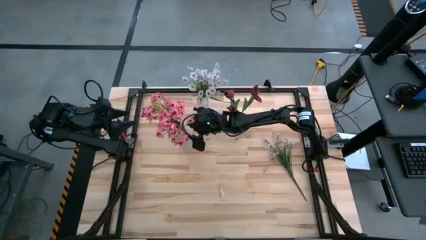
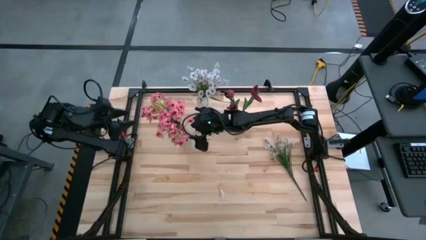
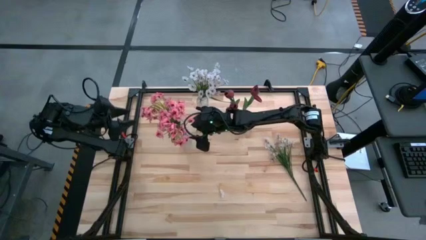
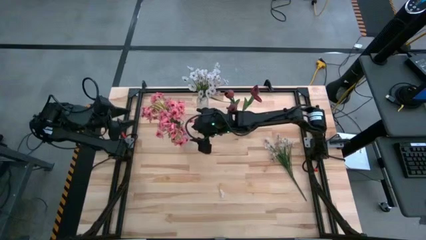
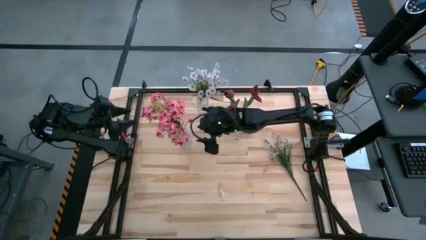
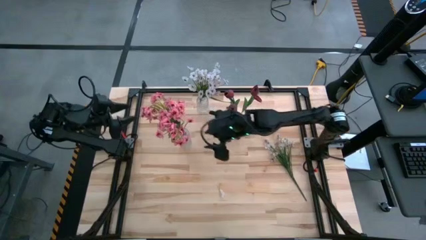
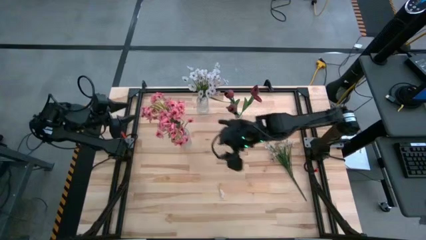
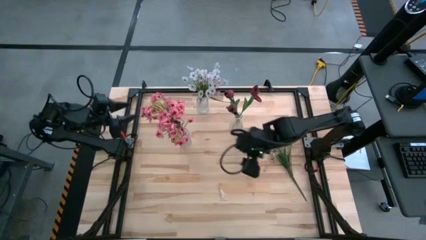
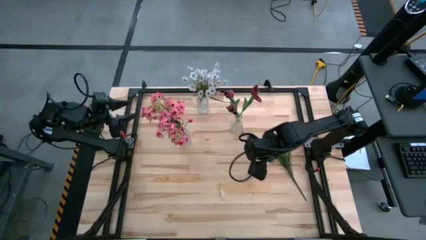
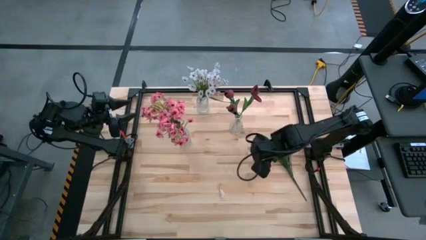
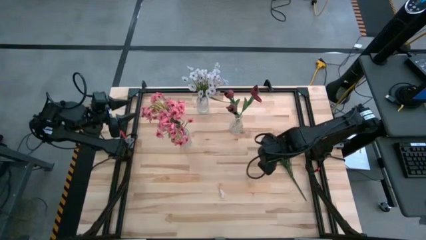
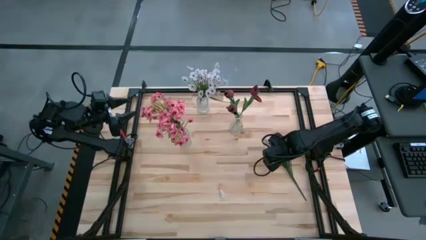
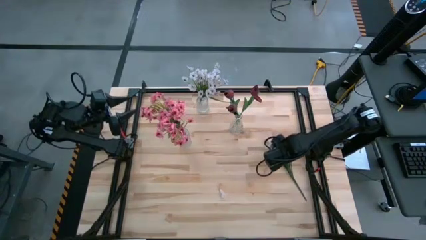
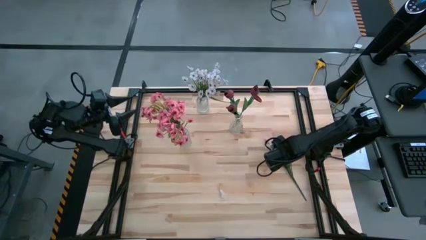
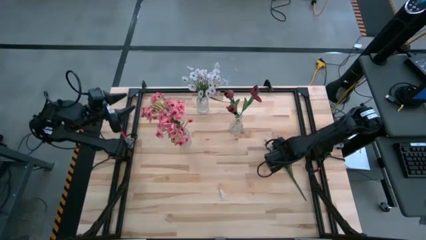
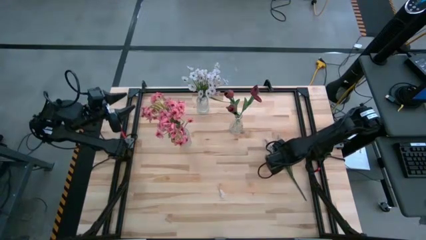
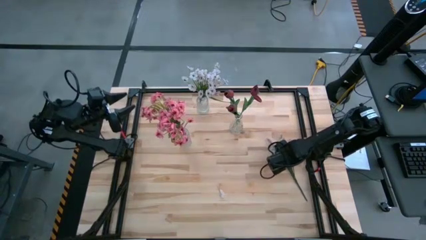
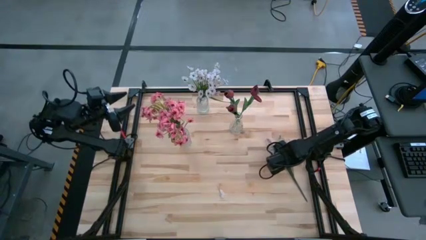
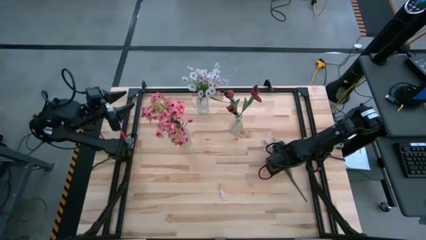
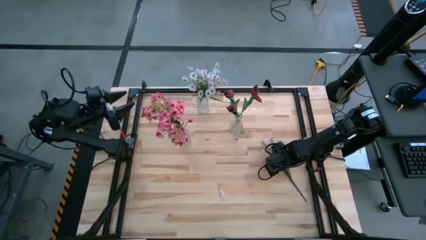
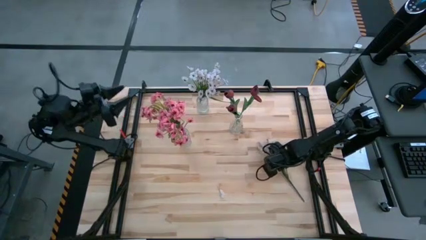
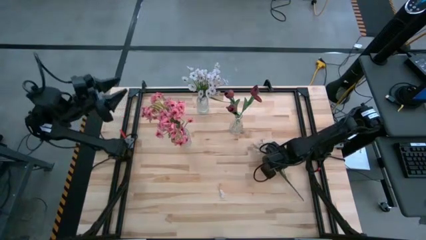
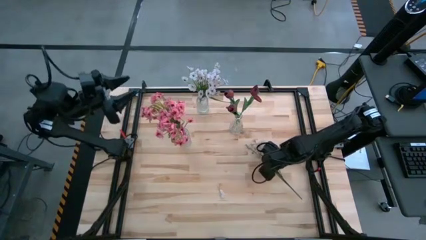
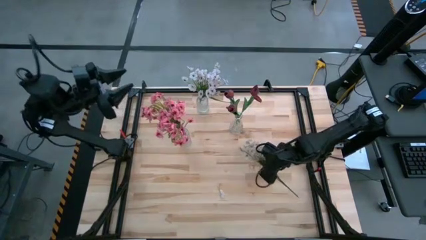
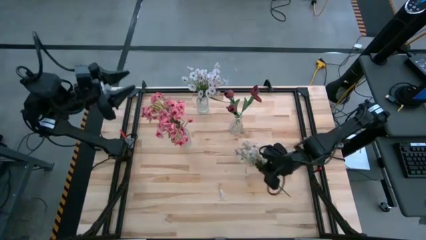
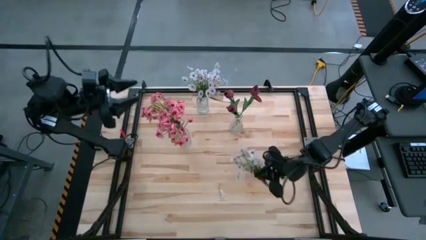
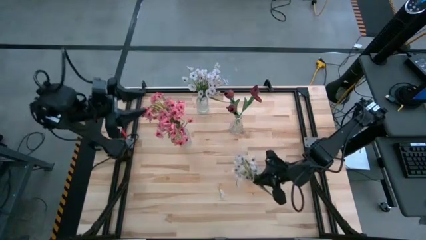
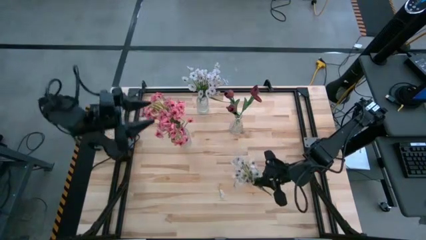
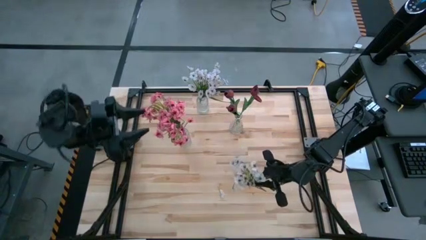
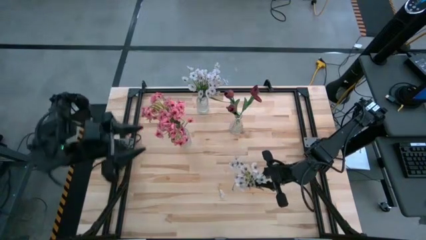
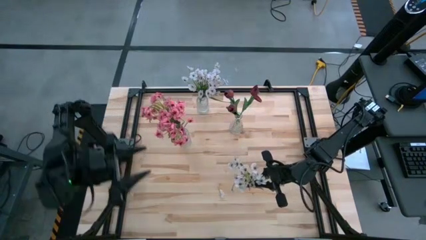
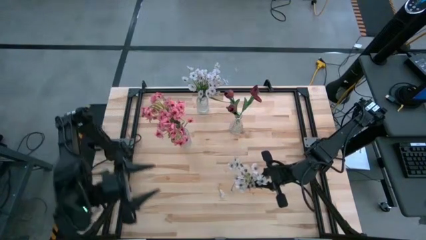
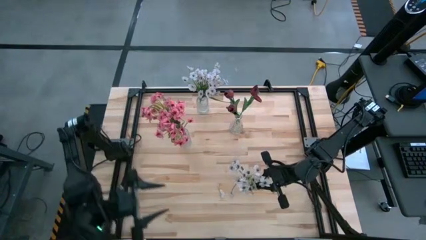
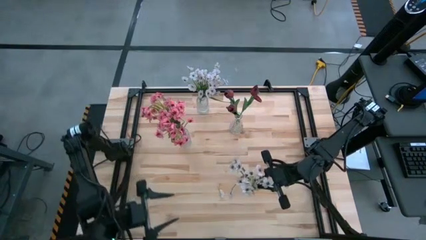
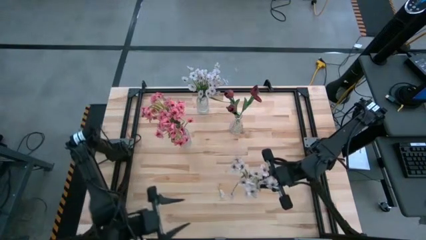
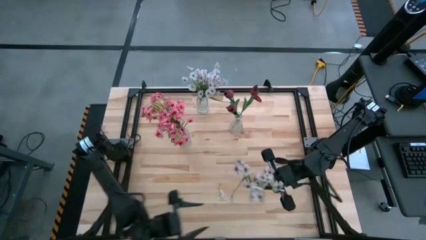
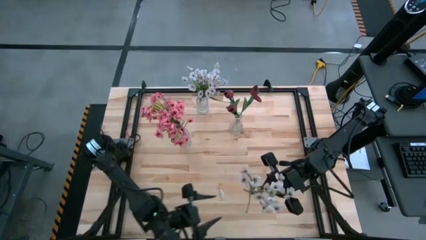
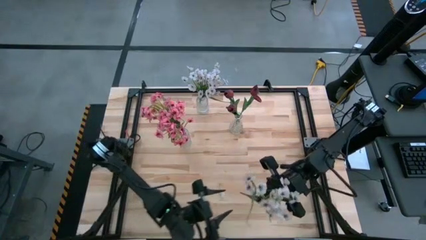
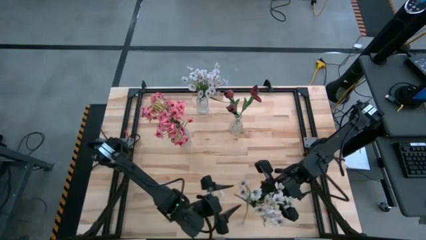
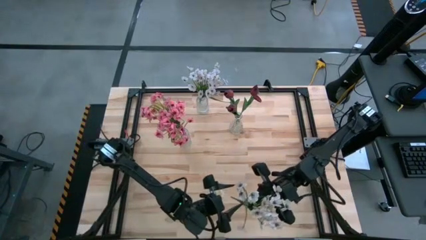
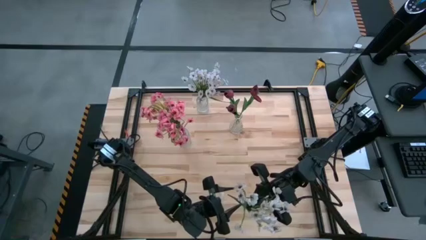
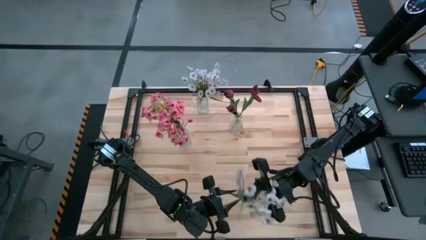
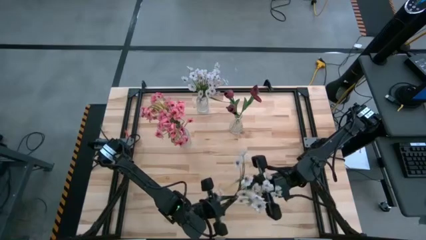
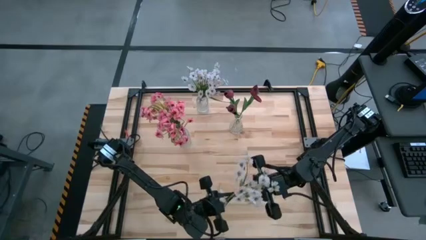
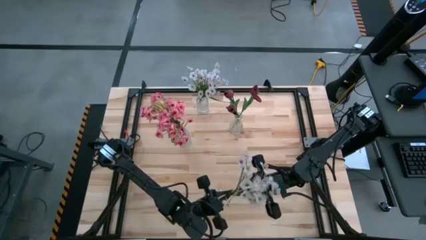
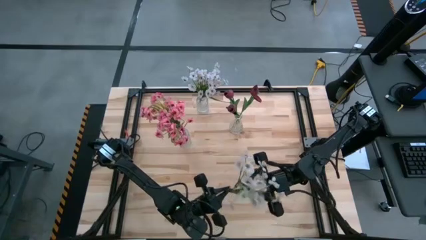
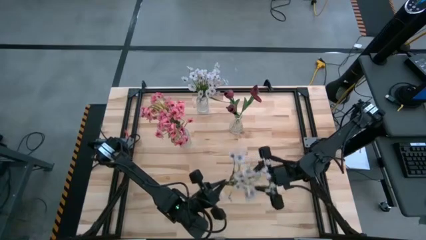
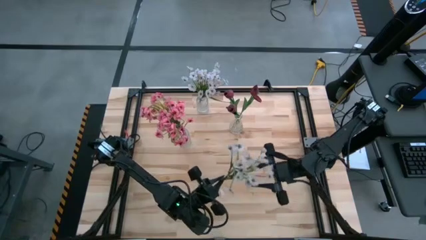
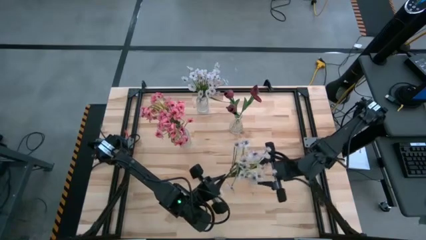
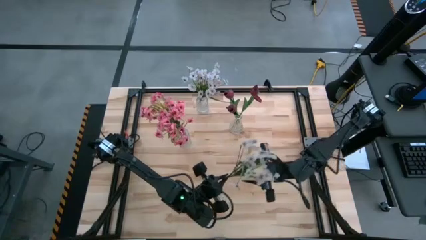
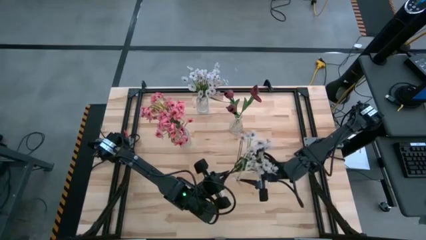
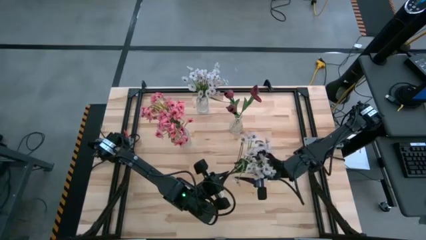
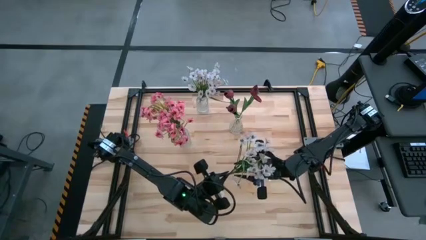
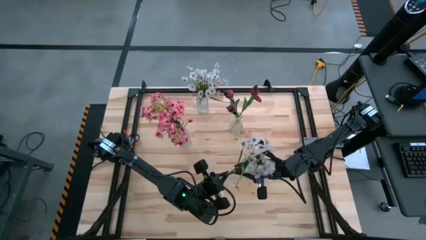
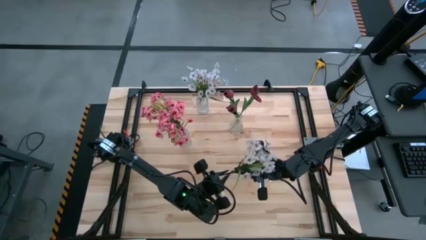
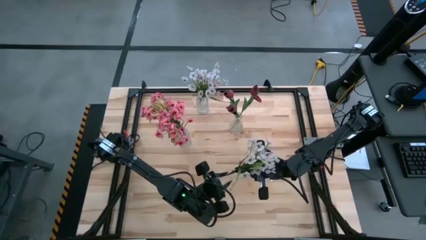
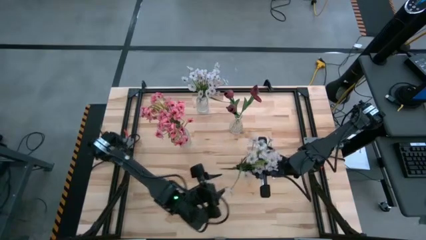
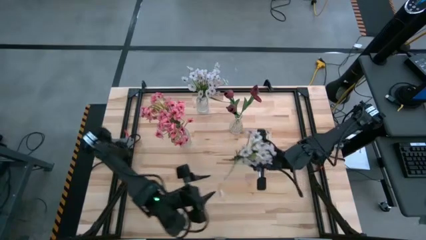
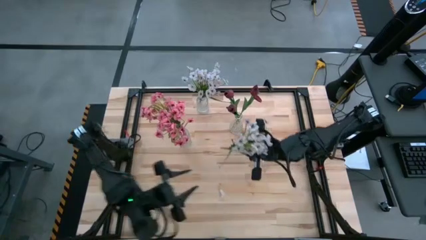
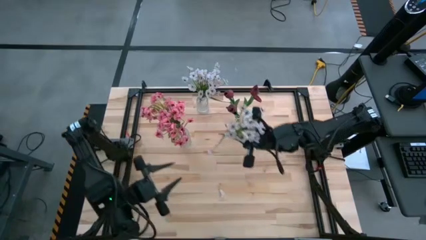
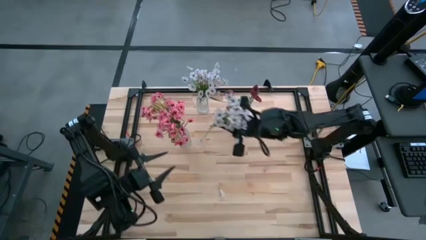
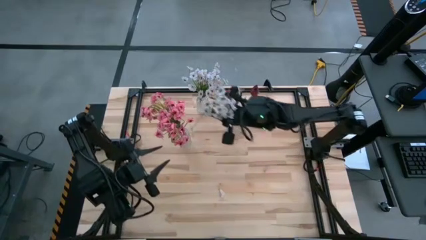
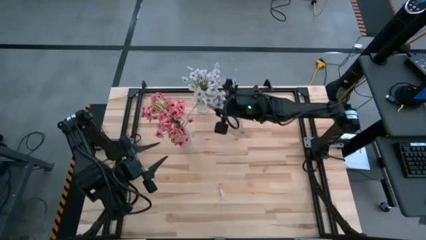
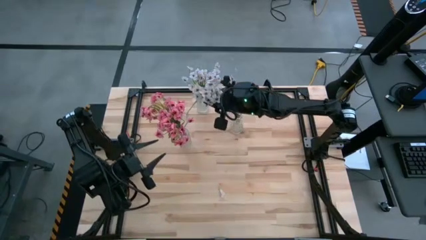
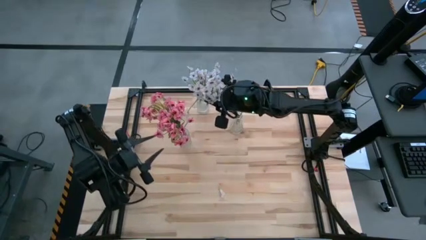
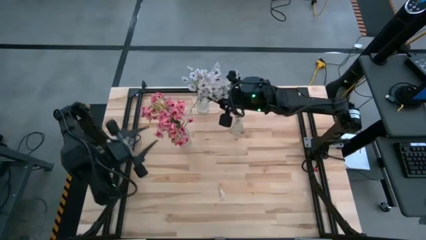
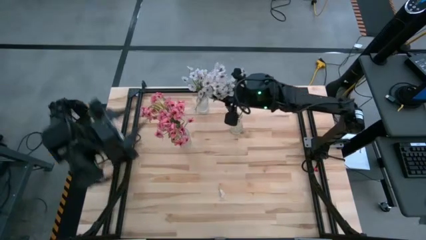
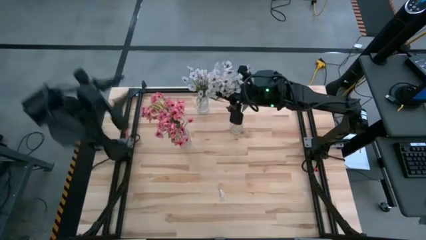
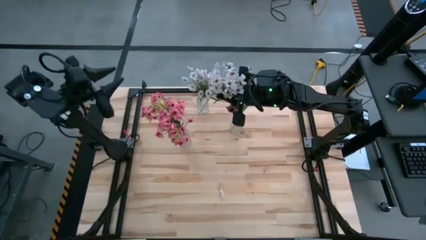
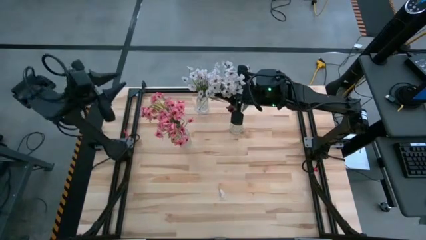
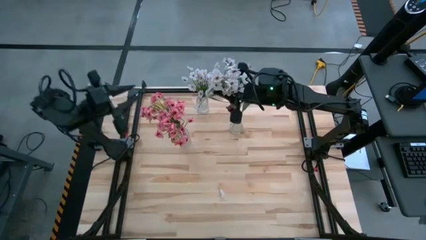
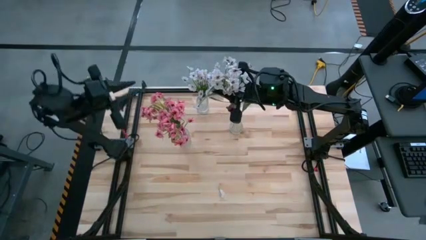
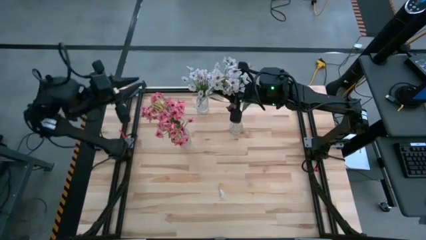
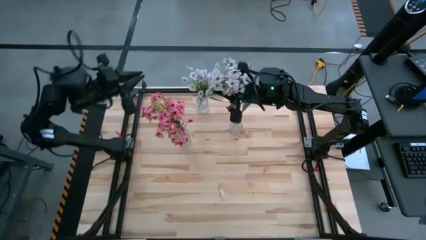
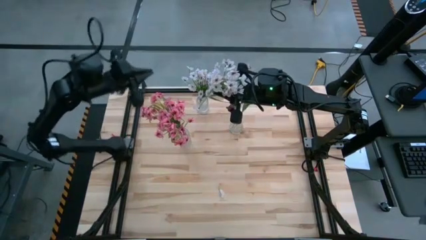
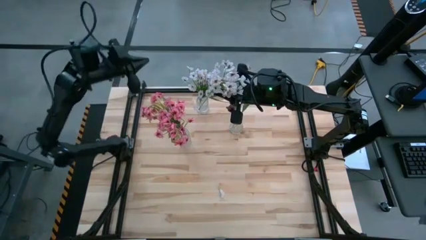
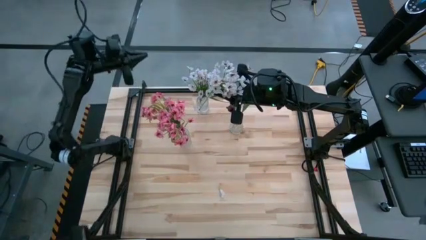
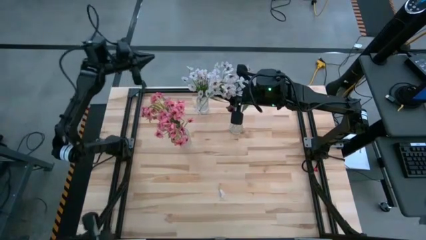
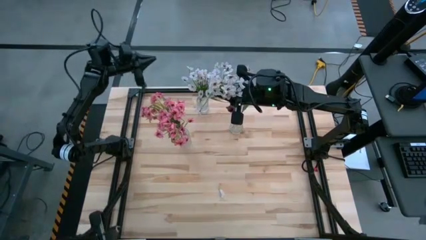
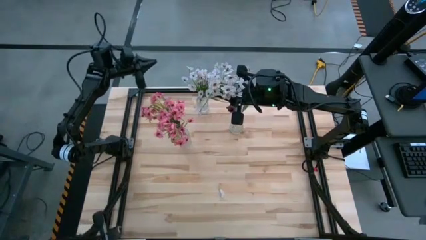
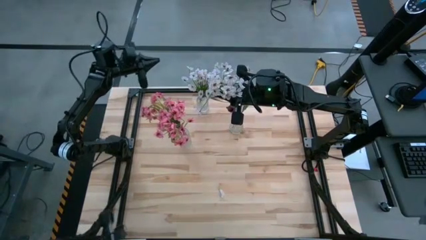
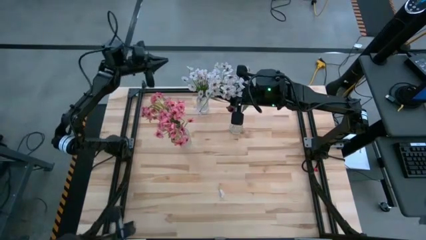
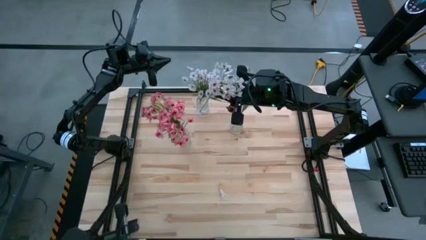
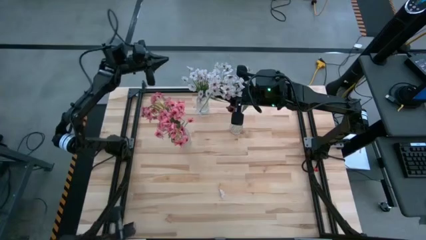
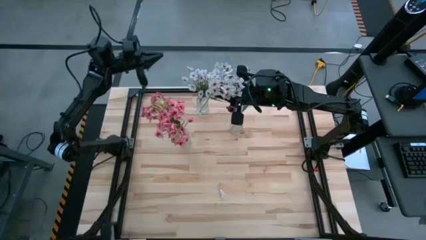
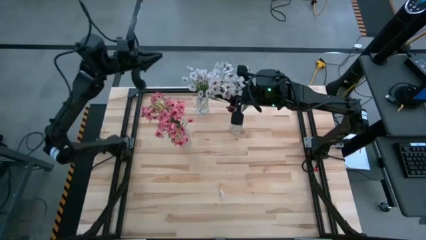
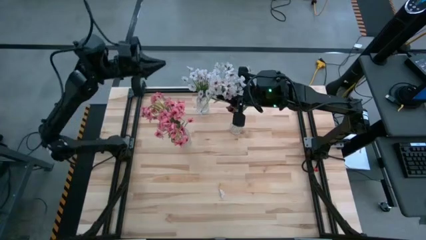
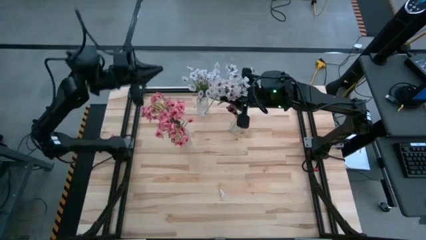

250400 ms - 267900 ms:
Task: Sort flowers into vase by color
Put the white flower into the top transparent vase
